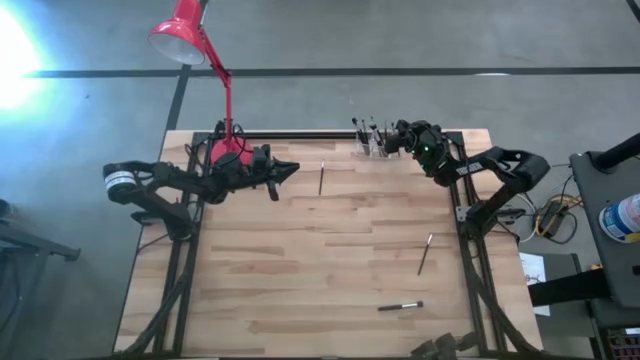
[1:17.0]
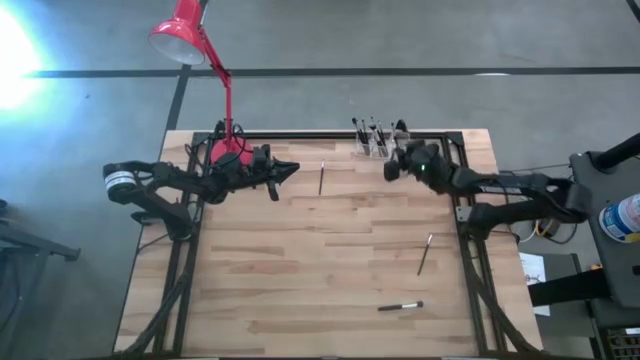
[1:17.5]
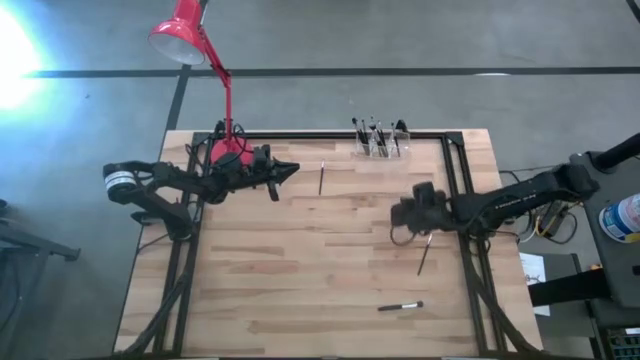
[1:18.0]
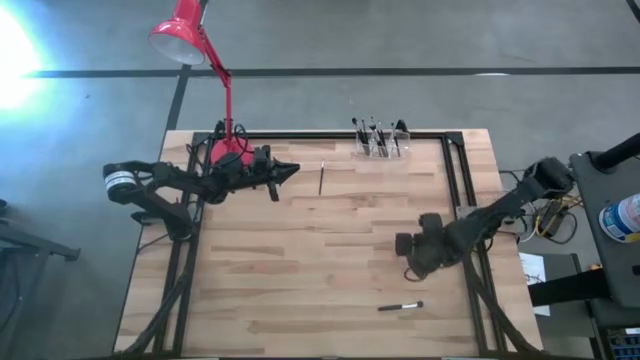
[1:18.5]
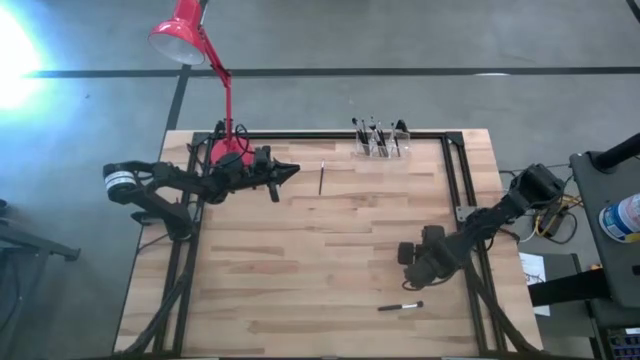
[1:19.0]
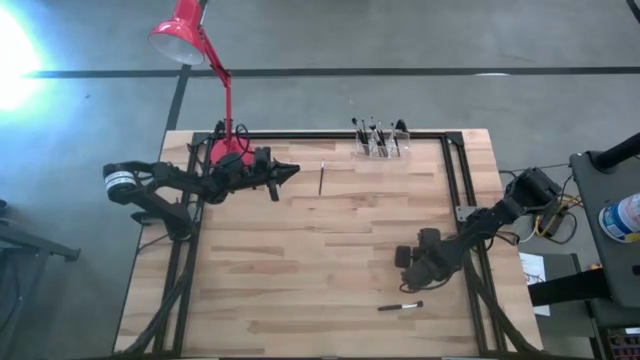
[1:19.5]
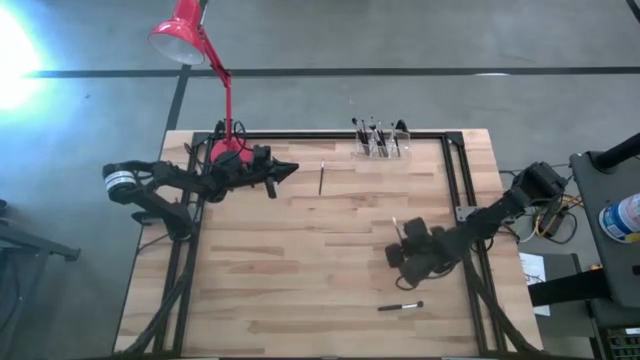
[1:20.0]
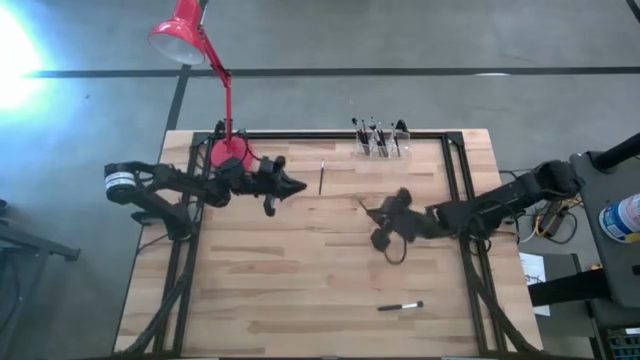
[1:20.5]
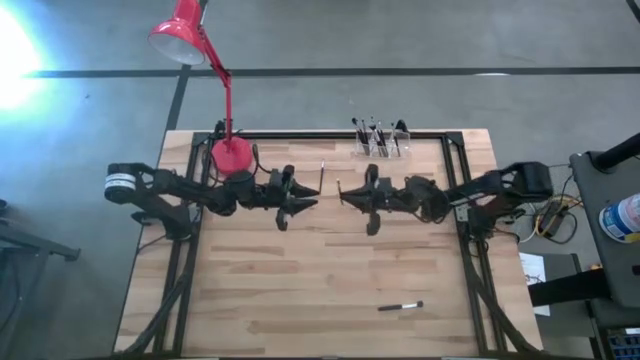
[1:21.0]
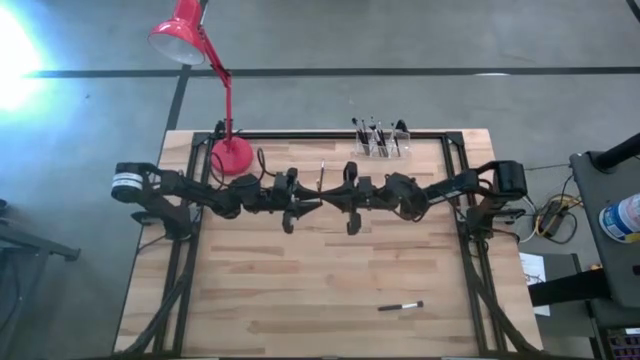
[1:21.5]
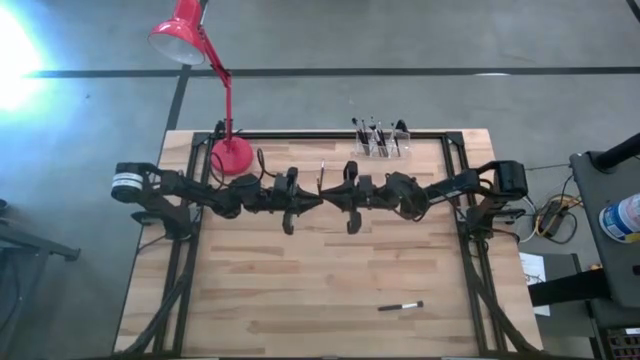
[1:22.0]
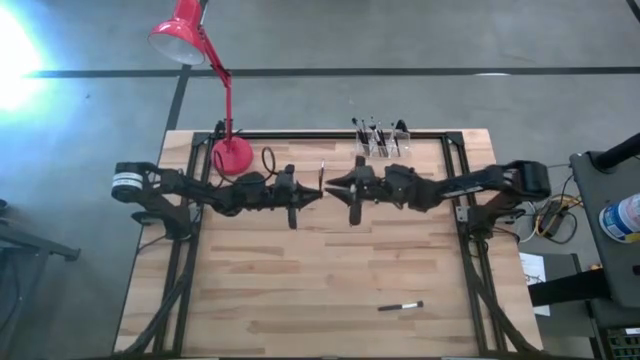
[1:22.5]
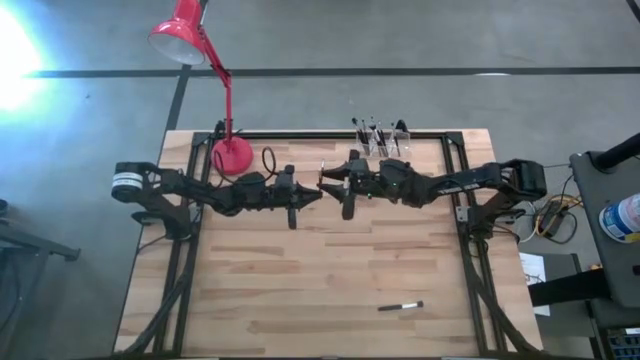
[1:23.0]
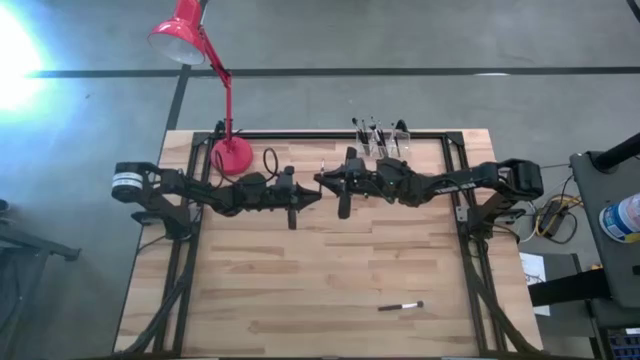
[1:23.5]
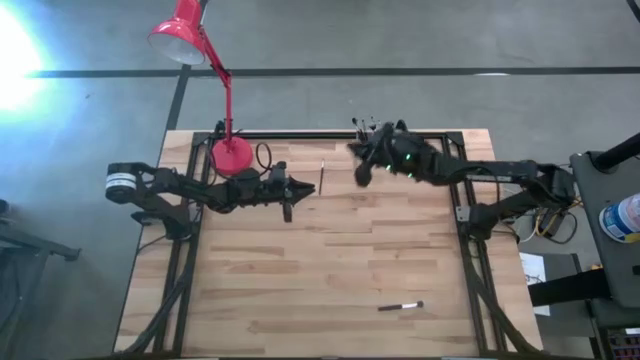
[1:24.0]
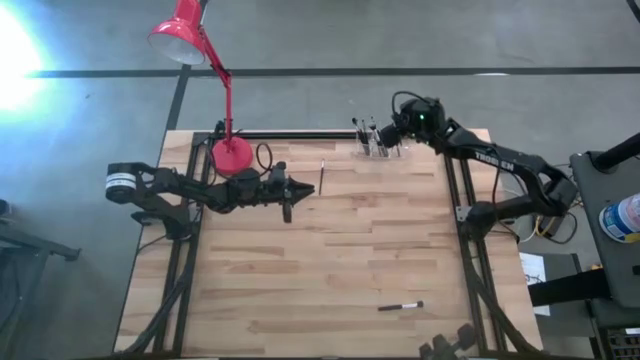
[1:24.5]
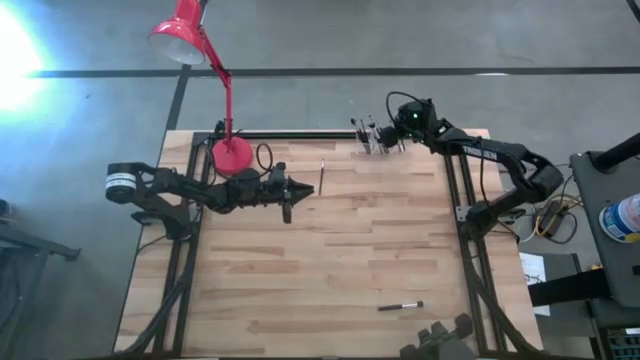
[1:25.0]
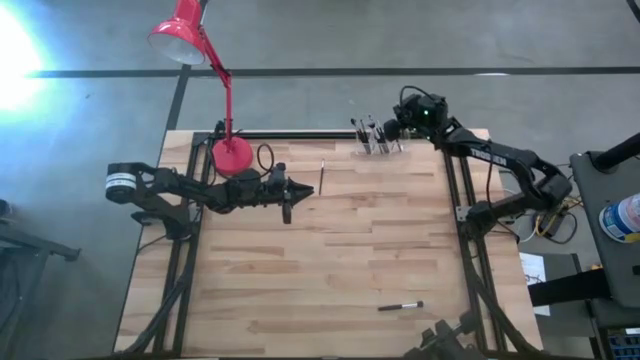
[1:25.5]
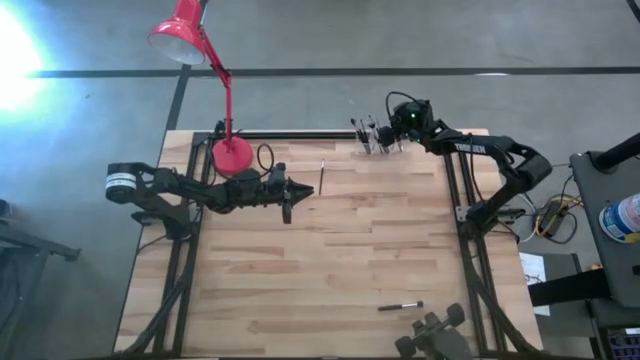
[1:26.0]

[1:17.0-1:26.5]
Task: Put items in baskets/containers
Put the white eyeshadow brush into the transparent organizer

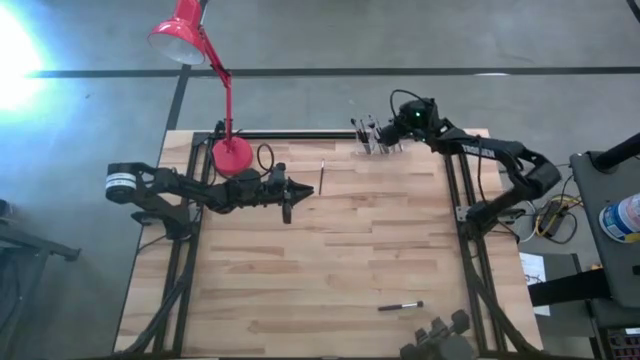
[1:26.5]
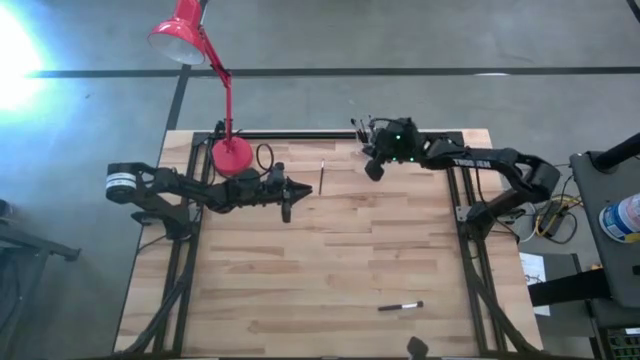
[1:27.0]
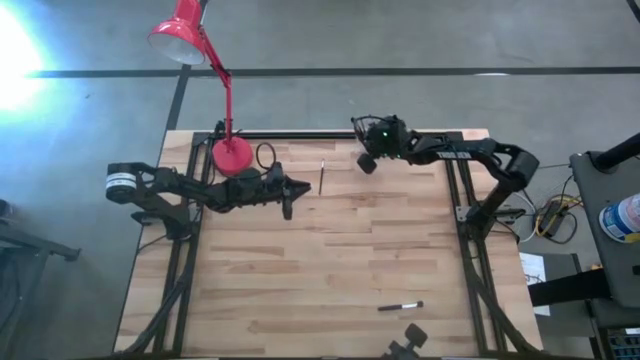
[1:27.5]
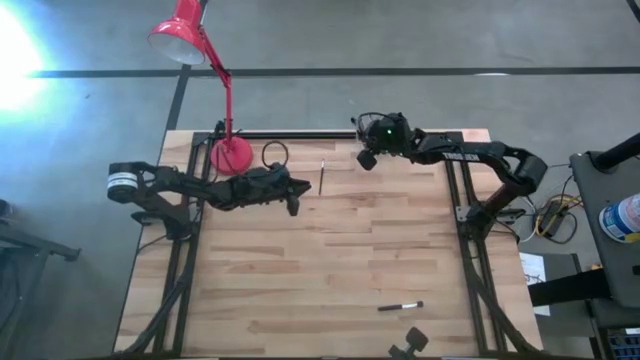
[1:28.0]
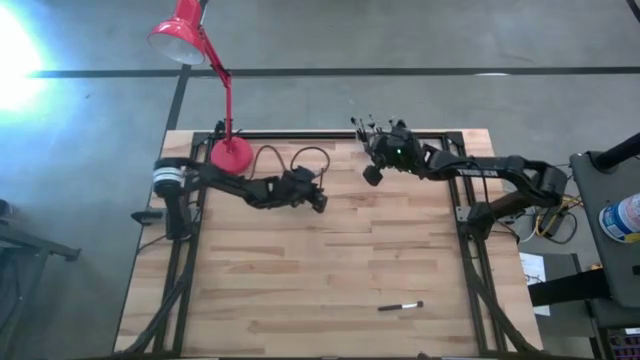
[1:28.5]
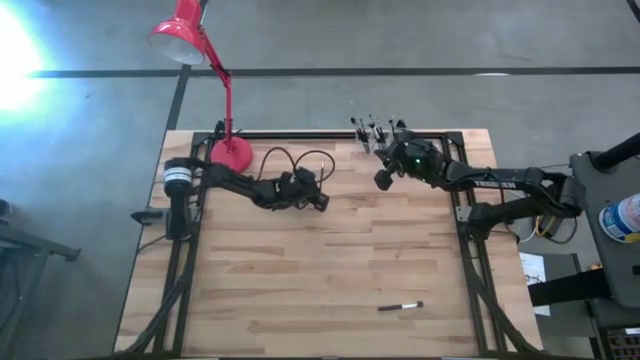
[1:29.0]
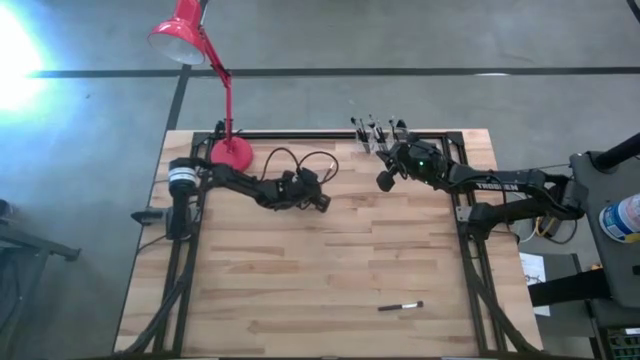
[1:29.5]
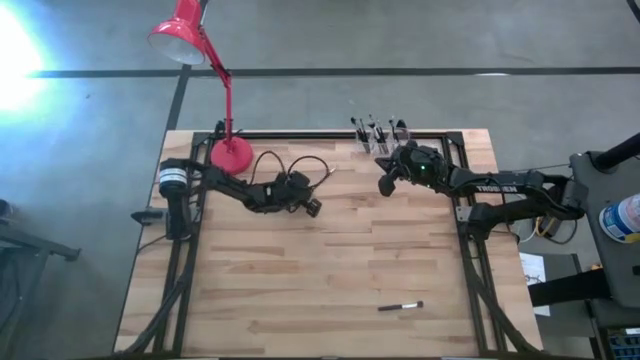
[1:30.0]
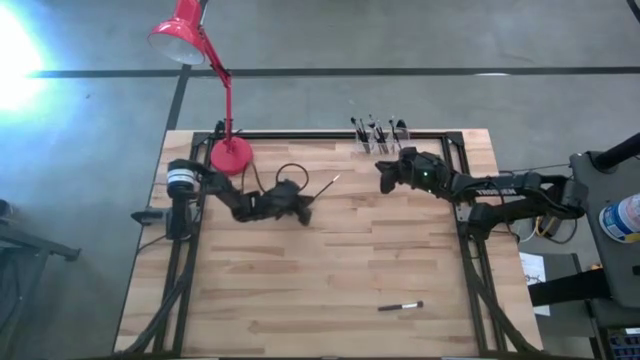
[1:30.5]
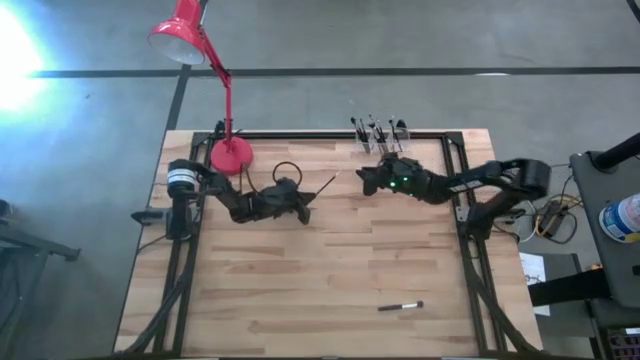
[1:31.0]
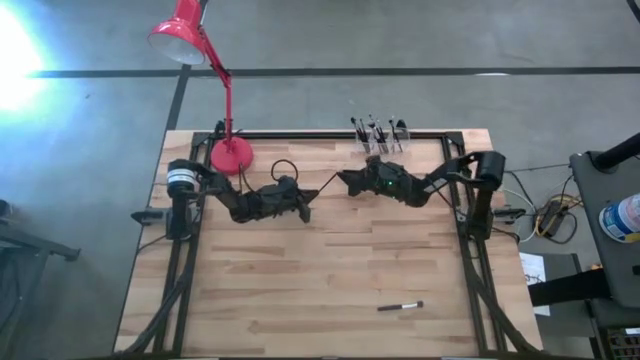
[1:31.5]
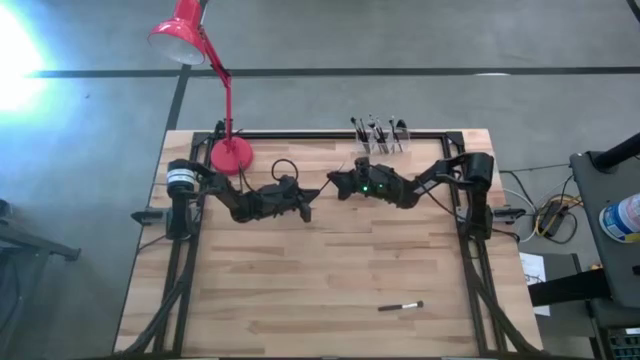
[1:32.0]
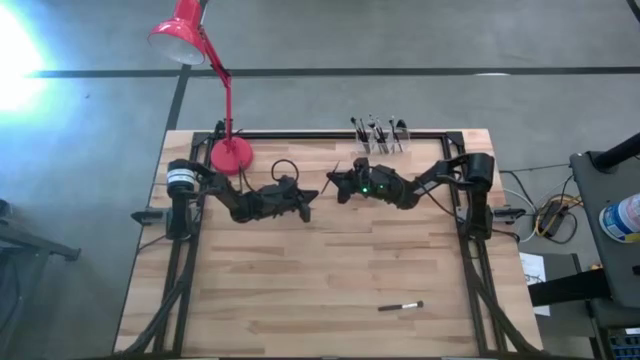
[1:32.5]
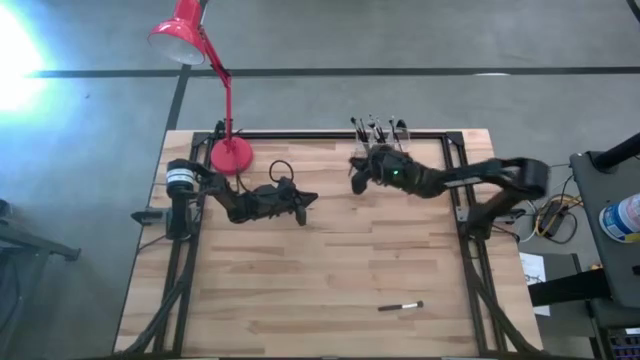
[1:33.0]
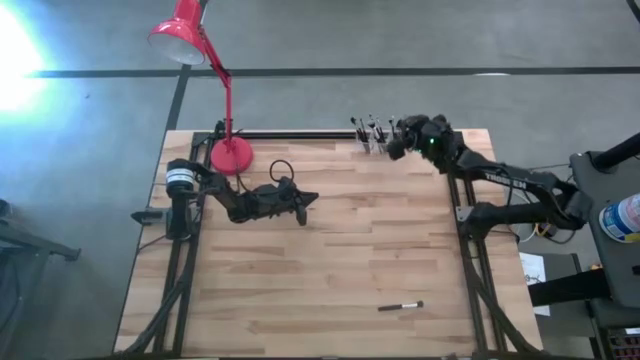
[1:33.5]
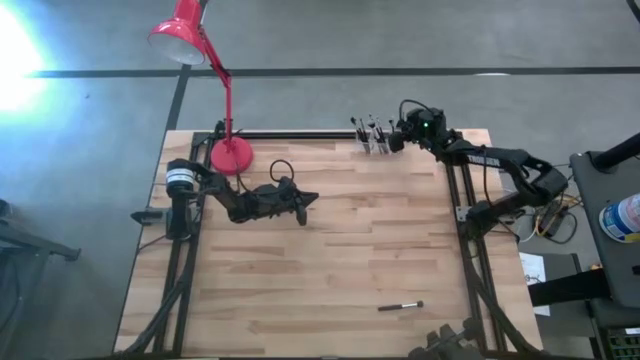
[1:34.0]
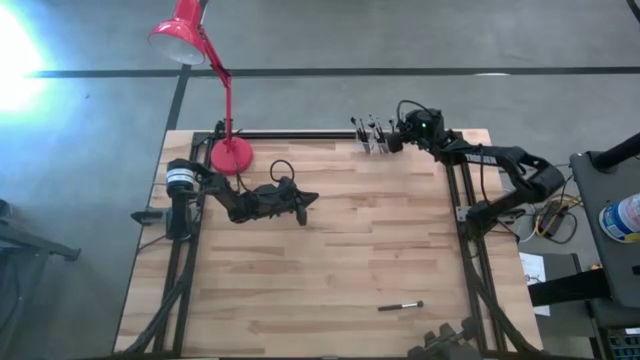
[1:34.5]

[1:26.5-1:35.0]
Put the eyeshadow brush into the transparent organizer

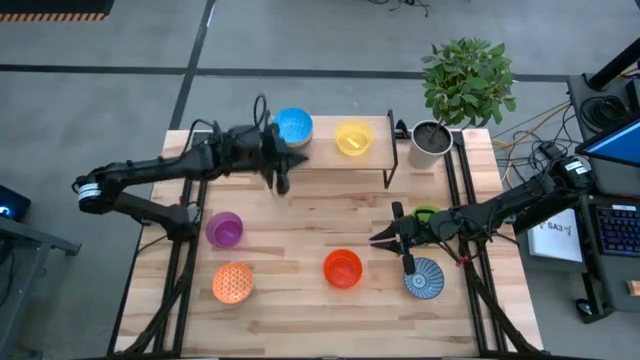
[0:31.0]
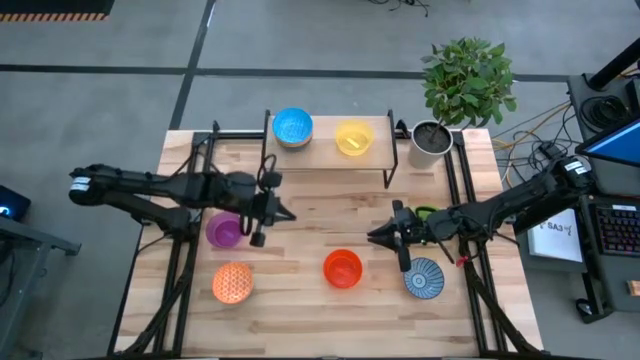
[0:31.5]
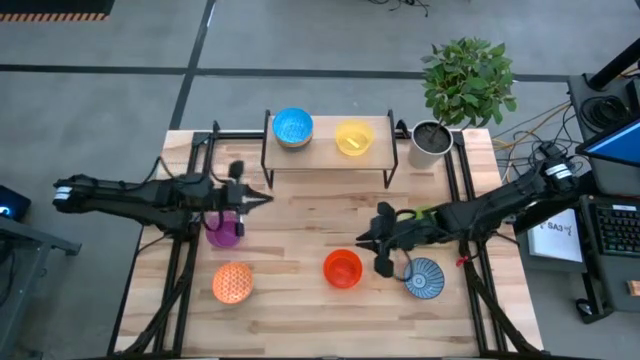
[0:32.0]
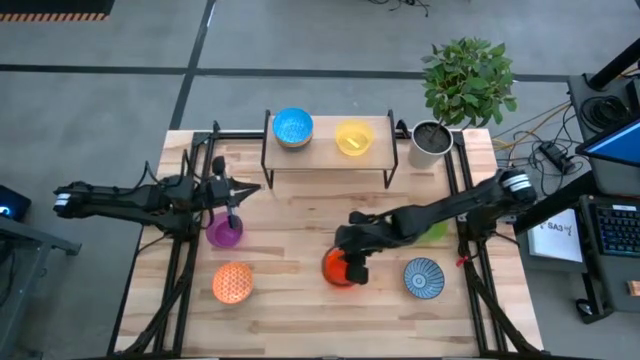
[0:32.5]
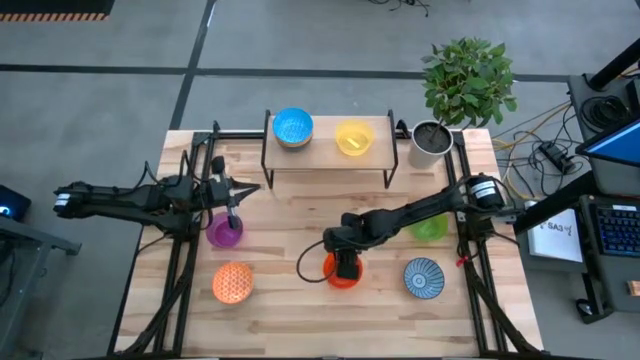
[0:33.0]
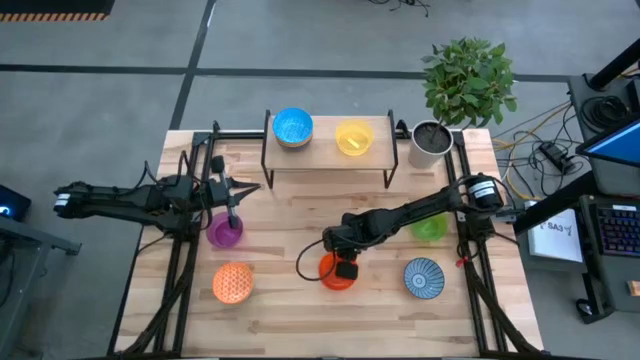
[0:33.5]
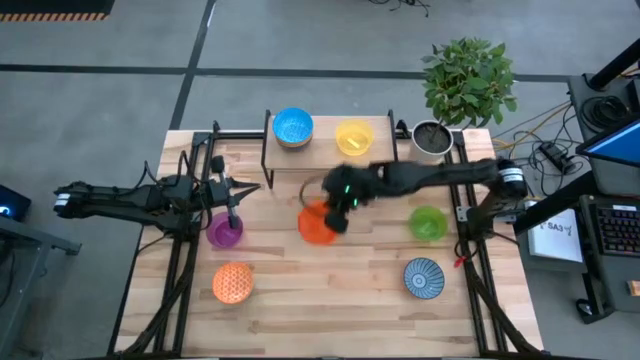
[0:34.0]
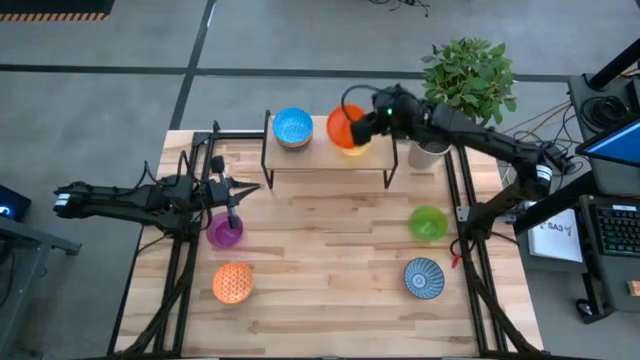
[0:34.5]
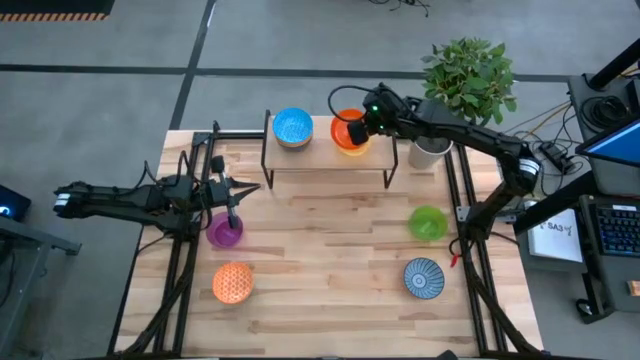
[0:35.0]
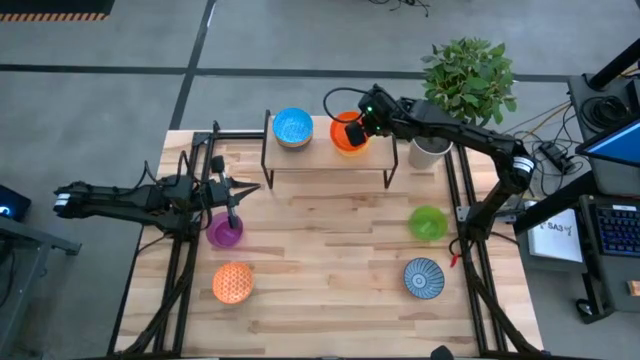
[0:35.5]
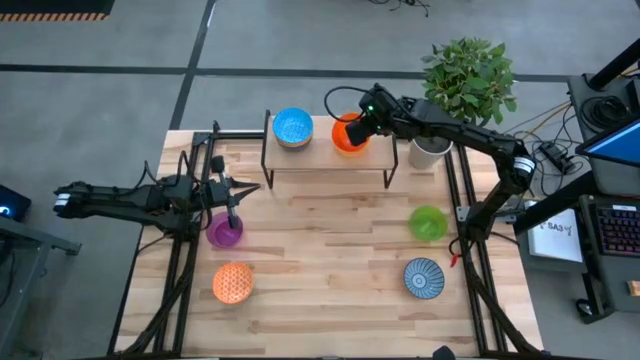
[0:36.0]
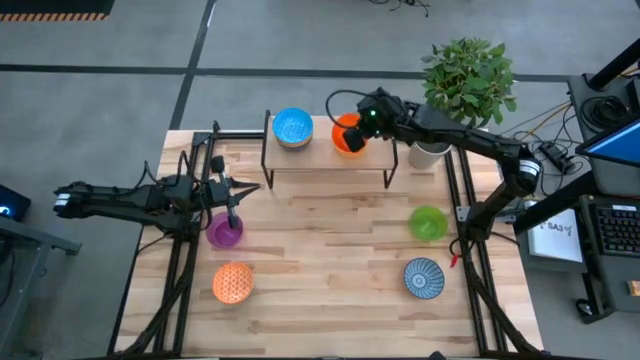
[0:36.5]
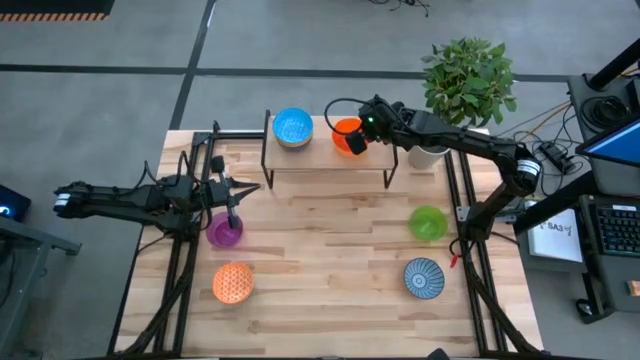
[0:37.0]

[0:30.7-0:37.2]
Task: Place and stack bowls onto a shelf
Stack the orange bowl on top of the light yellow bowl on the shelf
